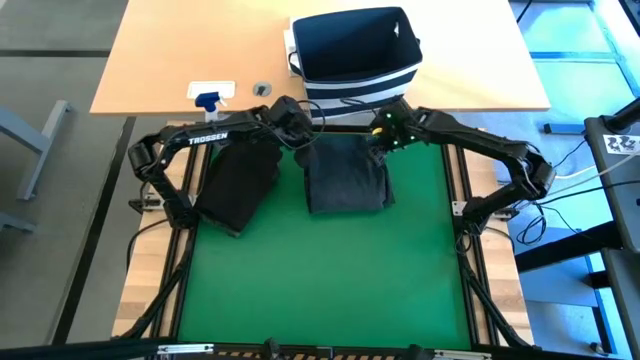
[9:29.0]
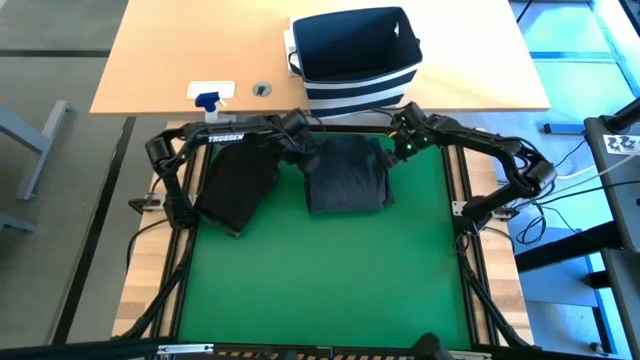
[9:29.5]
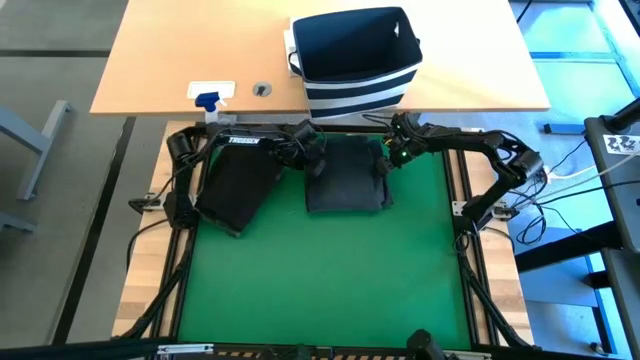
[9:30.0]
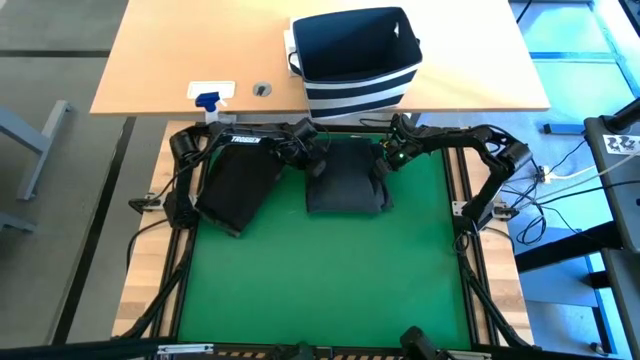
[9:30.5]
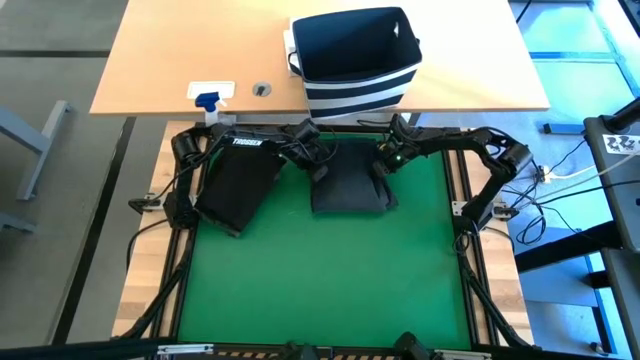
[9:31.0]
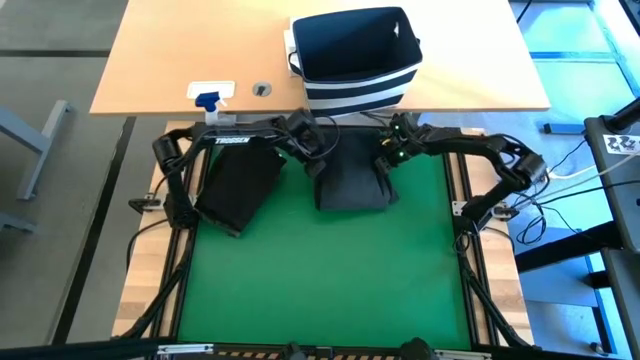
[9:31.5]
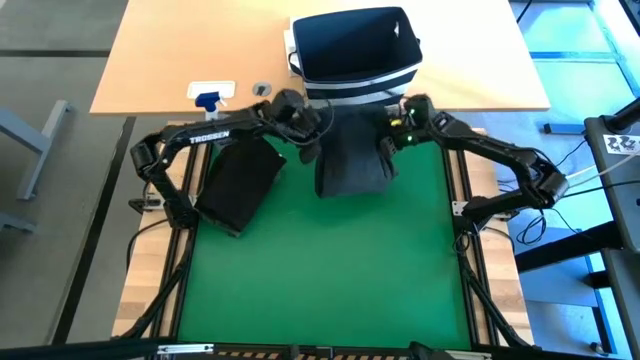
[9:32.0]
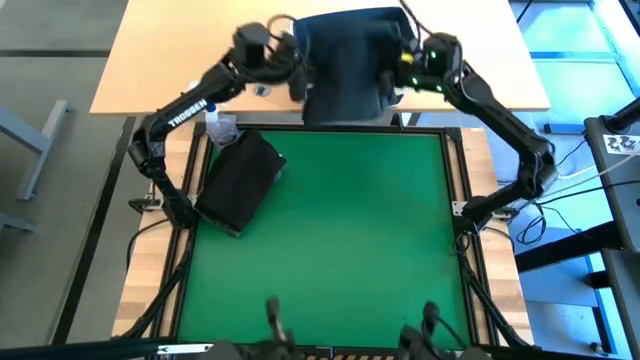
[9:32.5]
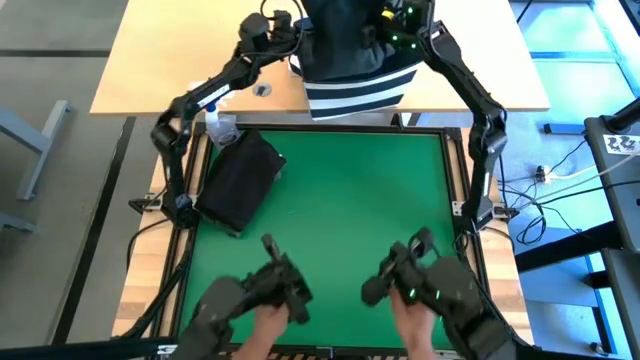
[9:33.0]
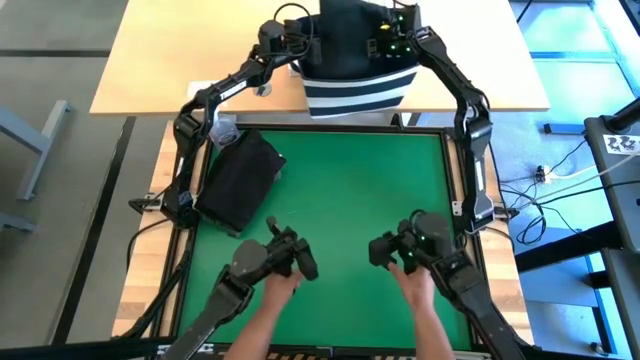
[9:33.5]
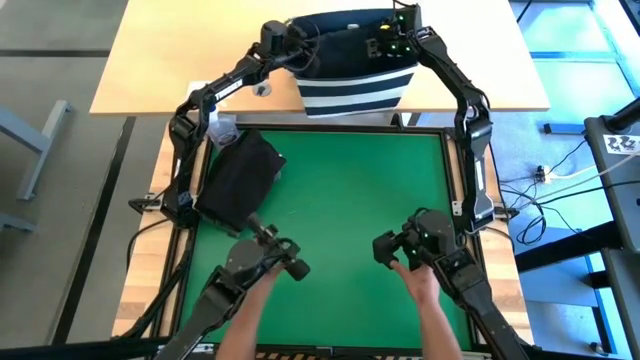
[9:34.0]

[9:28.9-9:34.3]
Task: Fold Laundry from Bin
Put the blue pants into the laundry organizer

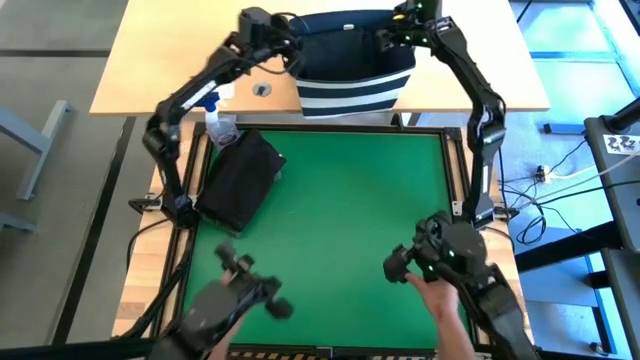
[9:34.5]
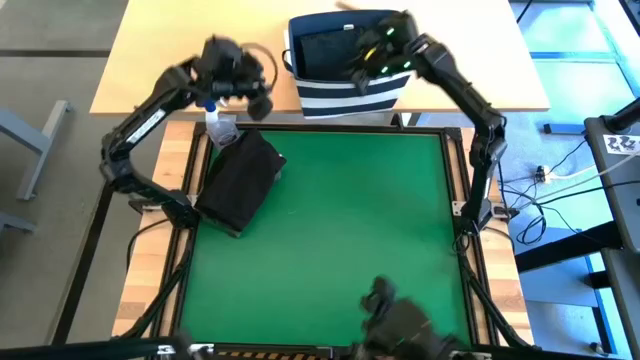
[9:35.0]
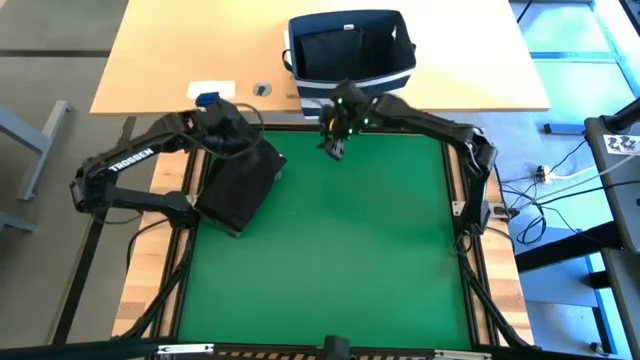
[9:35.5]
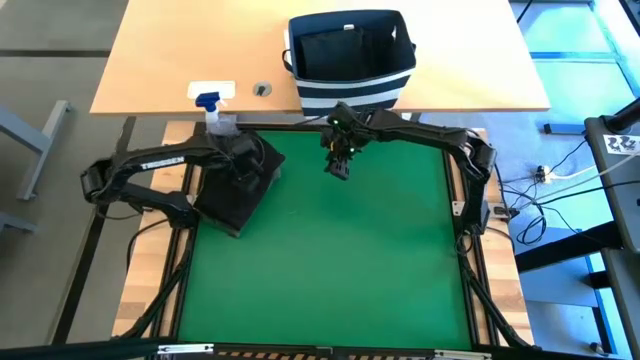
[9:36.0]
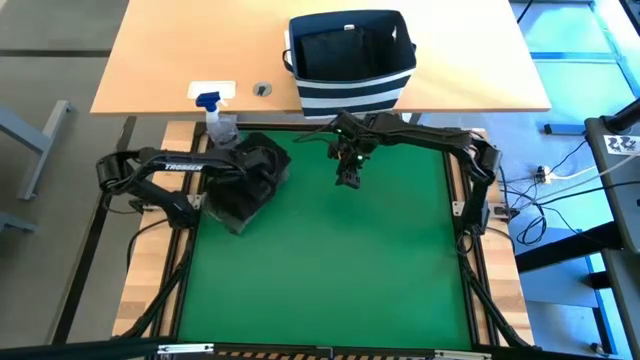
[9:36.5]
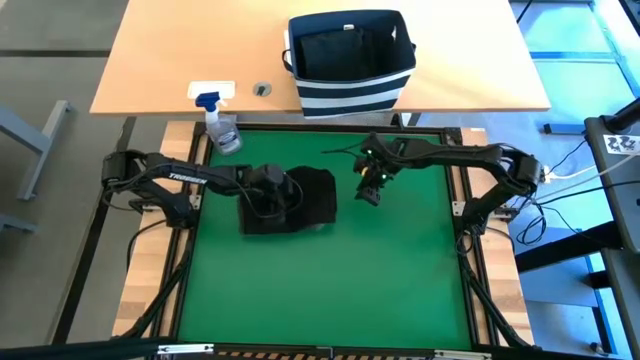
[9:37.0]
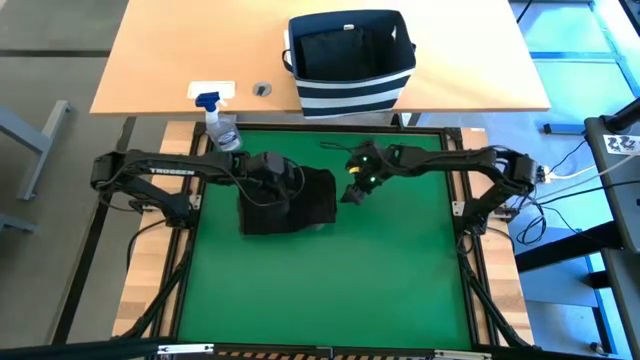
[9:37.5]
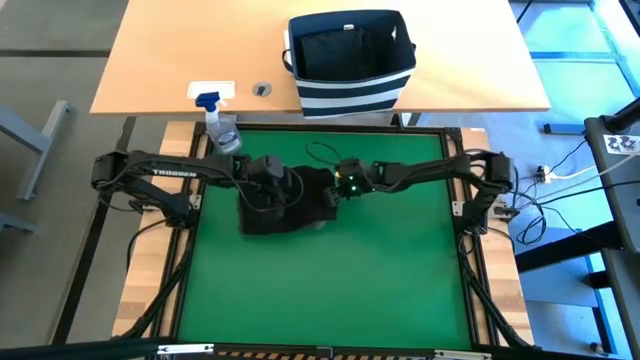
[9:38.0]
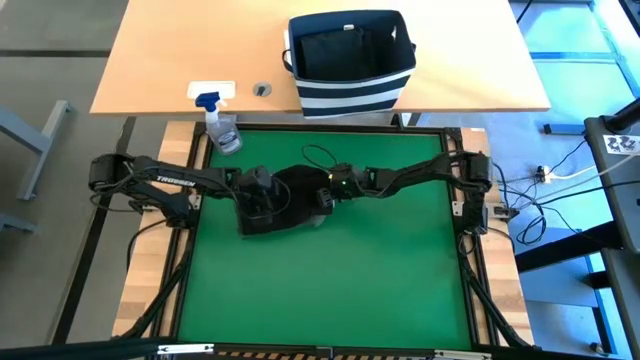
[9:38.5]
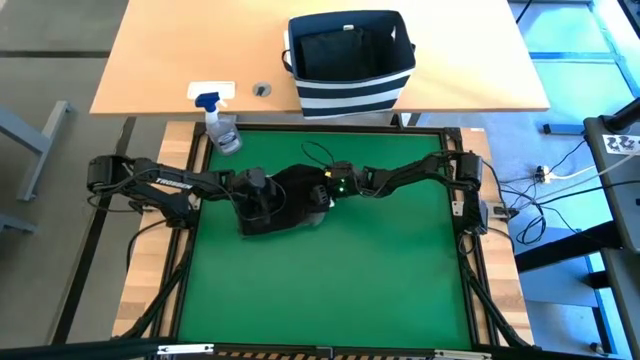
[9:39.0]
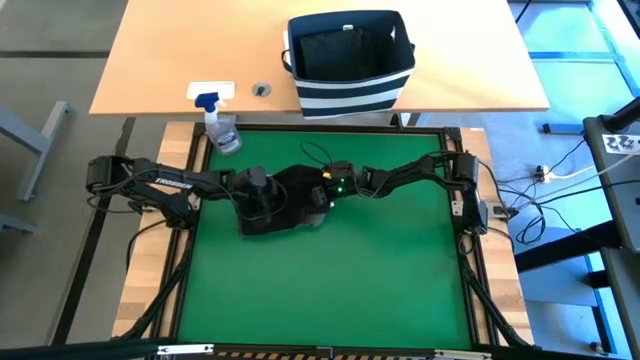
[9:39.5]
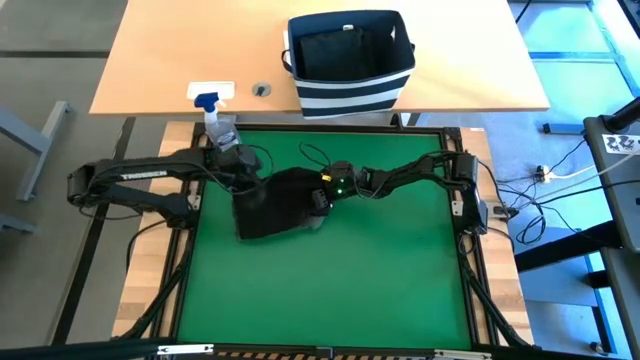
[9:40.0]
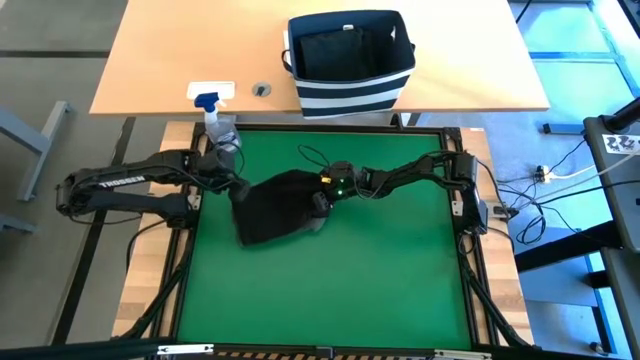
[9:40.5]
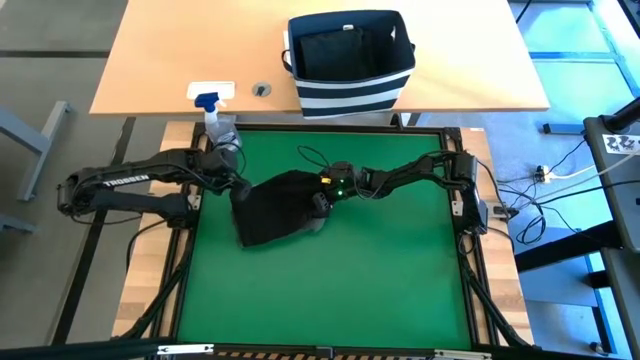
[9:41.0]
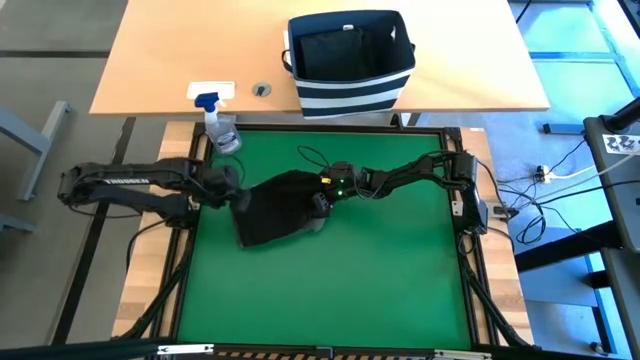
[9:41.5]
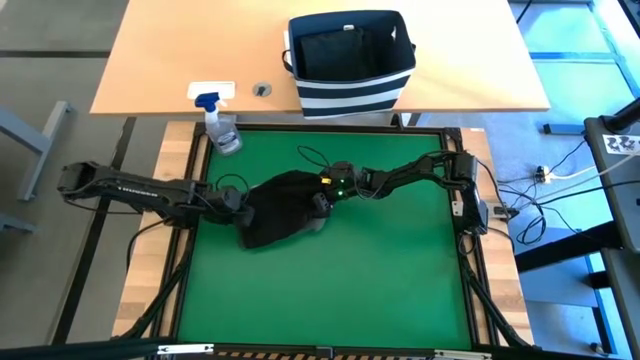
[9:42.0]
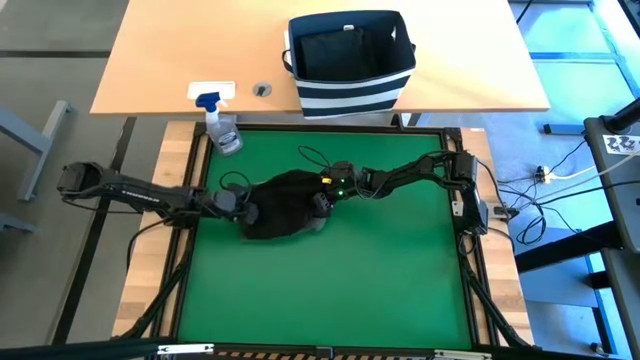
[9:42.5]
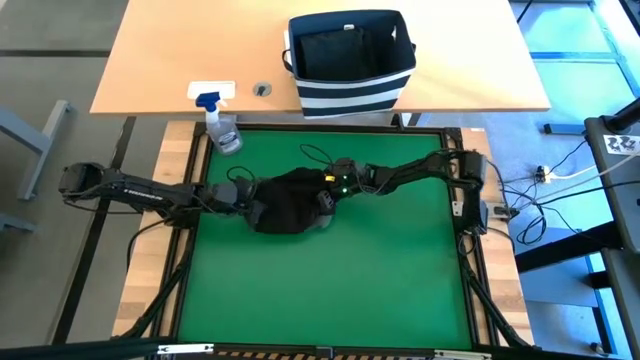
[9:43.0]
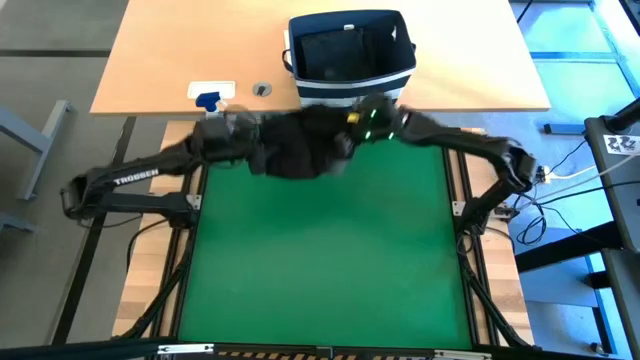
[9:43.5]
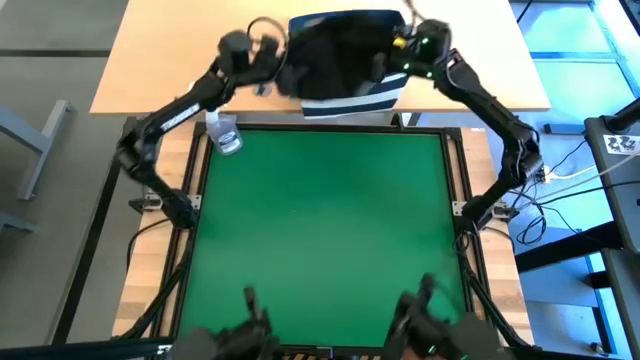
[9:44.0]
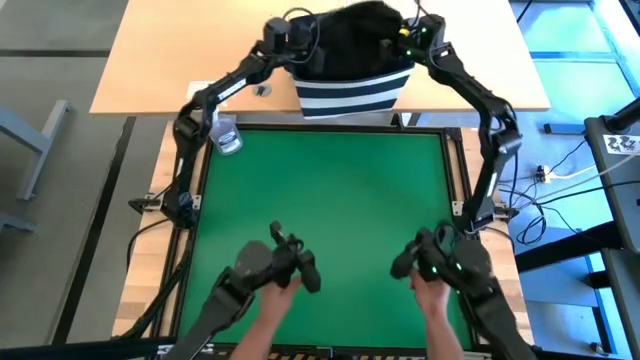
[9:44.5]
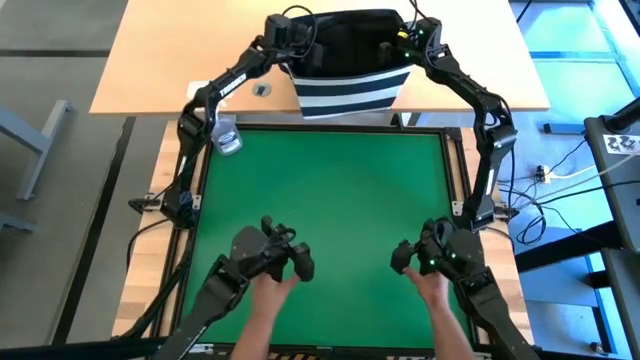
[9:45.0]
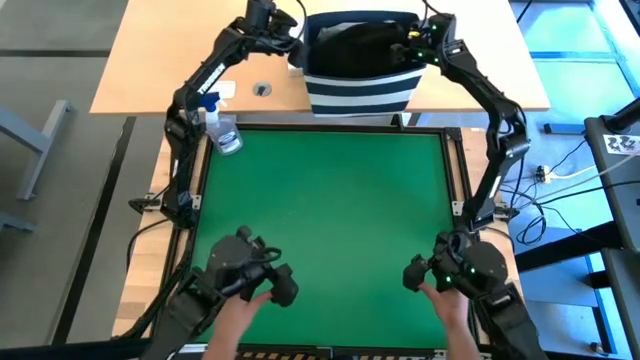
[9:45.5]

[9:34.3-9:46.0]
Put the stacked clothes into the laundry organizer

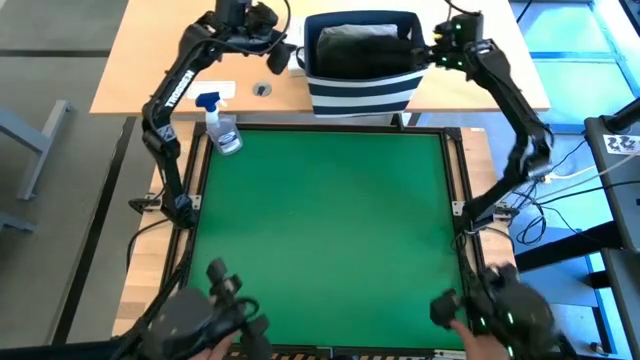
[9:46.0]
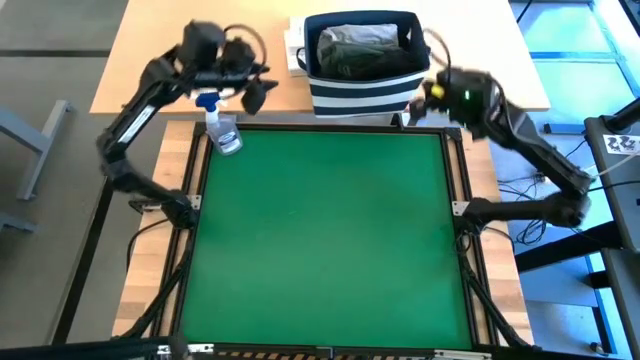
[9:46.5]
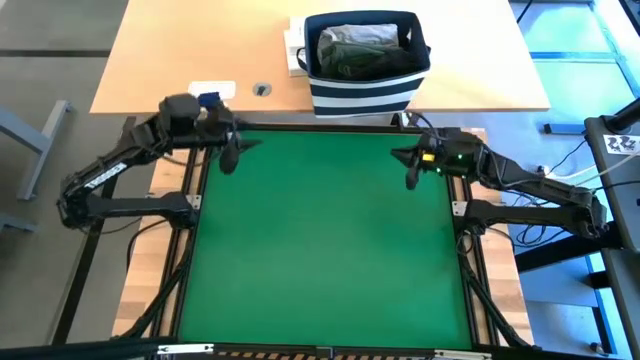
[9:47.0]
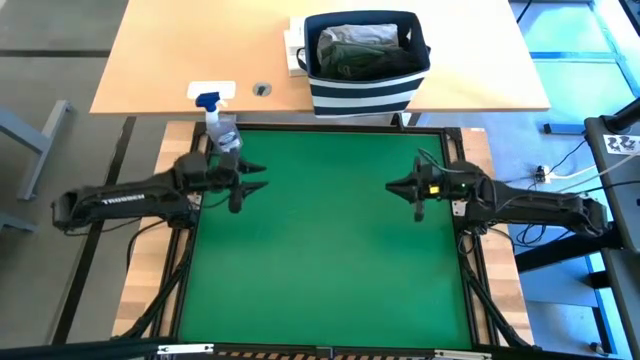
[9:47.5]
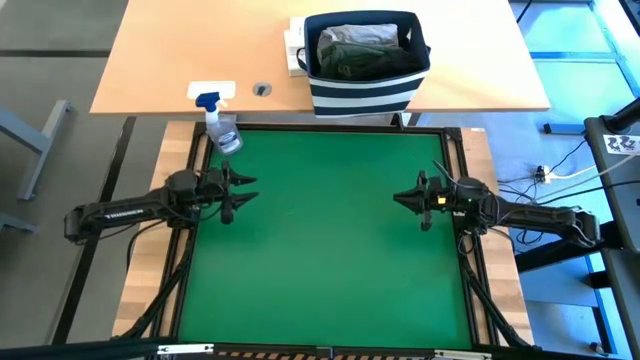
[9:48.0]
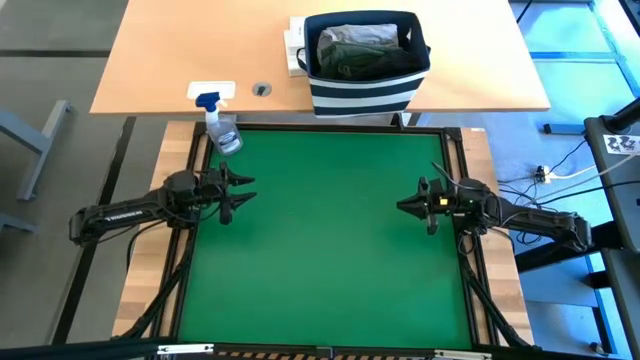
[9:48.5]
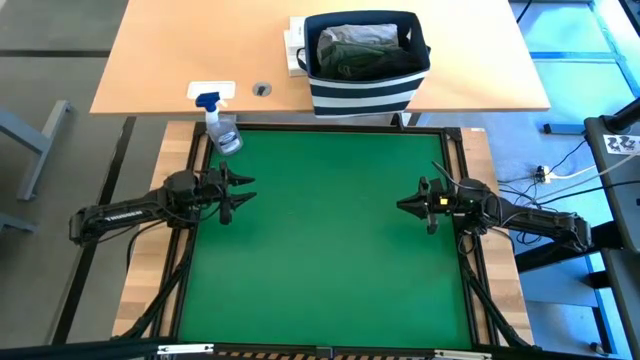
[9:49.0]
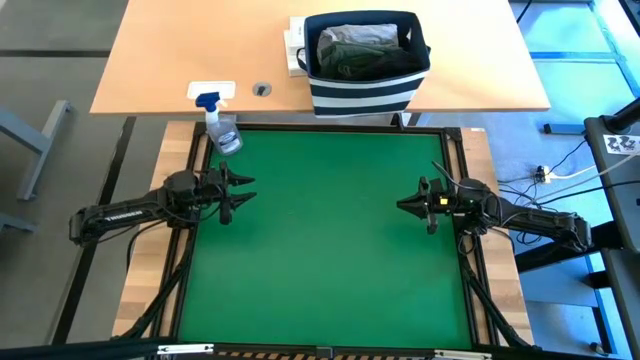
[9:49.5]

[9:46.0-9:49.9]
Return to Home Position
